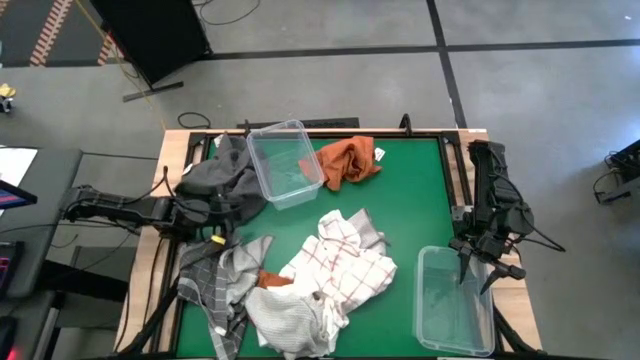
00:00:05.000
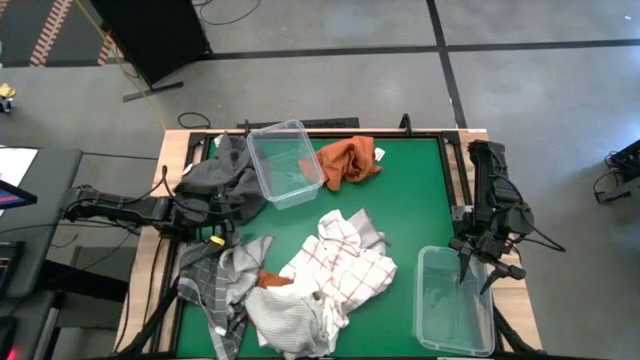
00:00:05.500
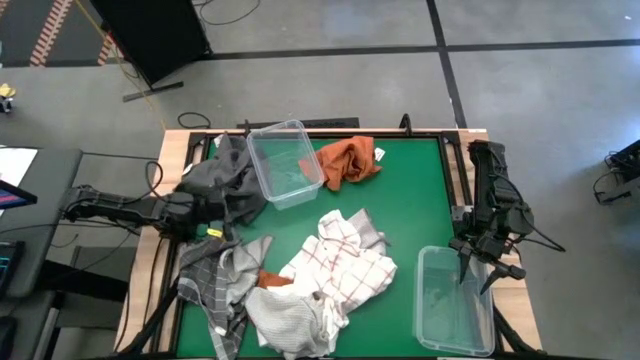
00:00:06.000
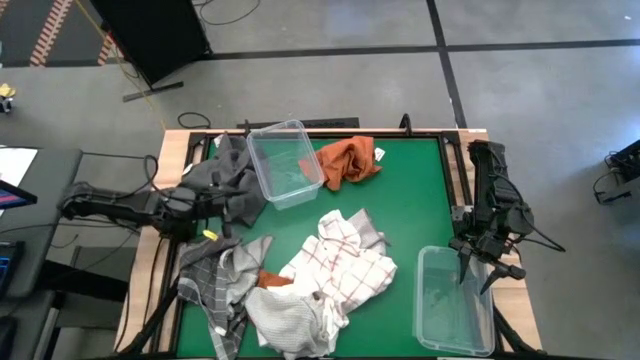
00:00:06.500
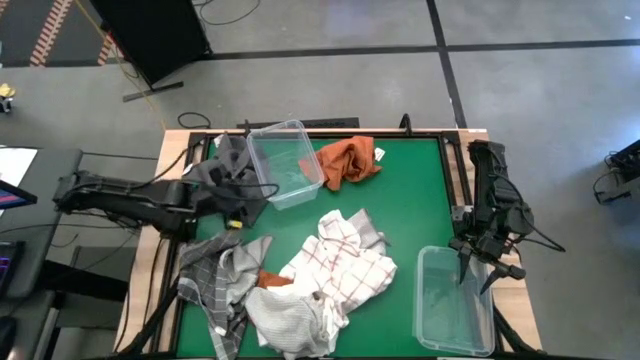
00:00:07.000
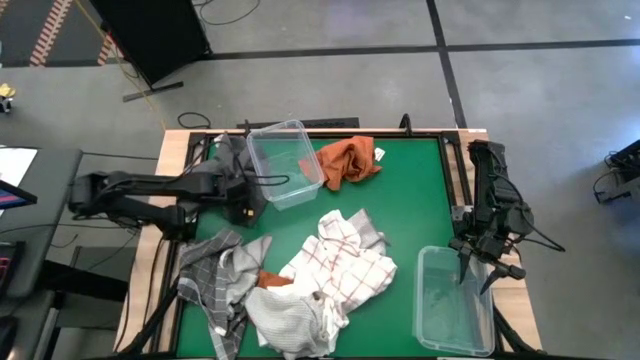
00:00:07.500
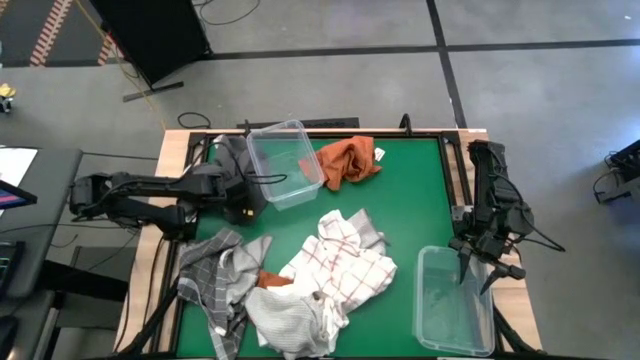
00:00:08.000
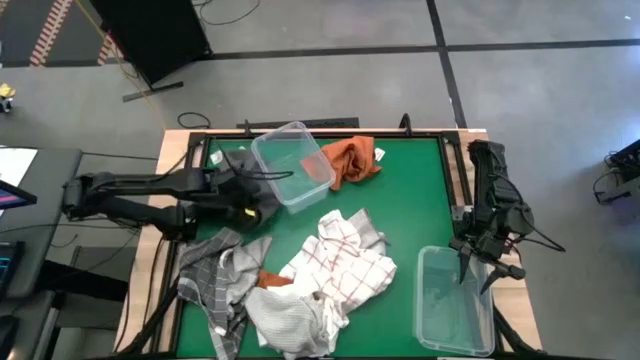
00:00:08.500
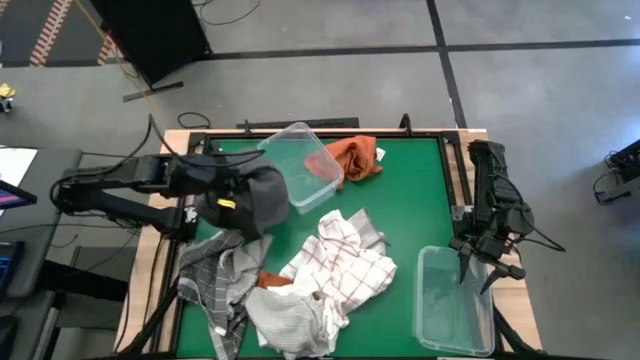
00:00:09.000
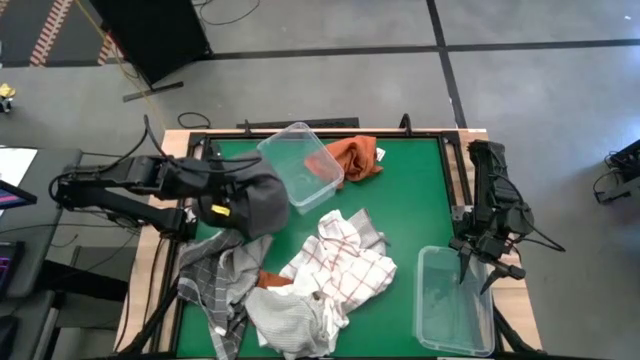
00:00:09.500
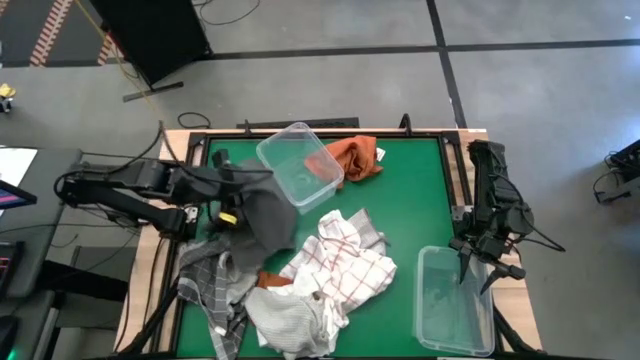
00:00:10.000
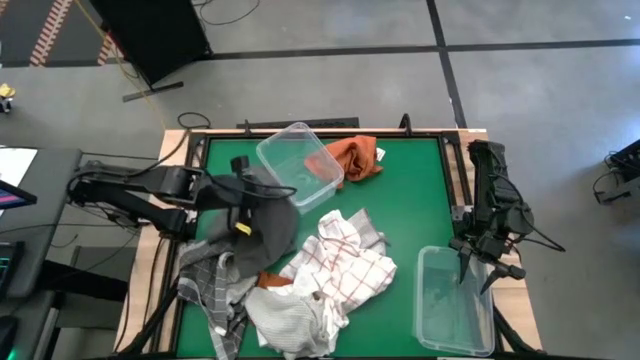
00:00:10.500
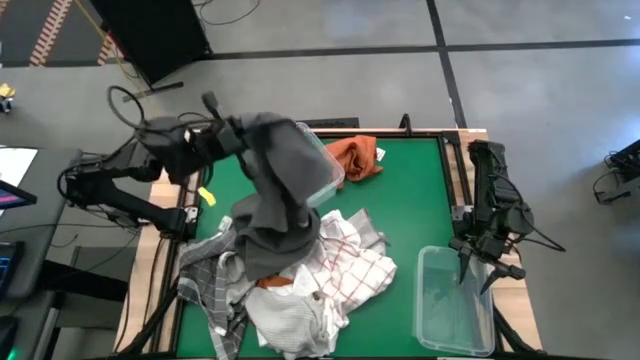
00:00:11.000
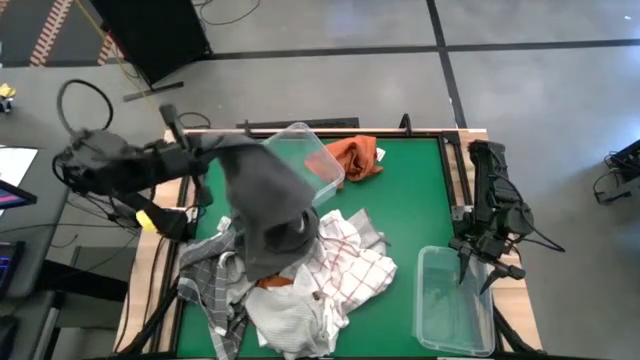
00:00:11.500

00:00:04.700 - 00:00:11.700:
Task: Sort towels by color in basket
Put the gray towel into the top transparent bin

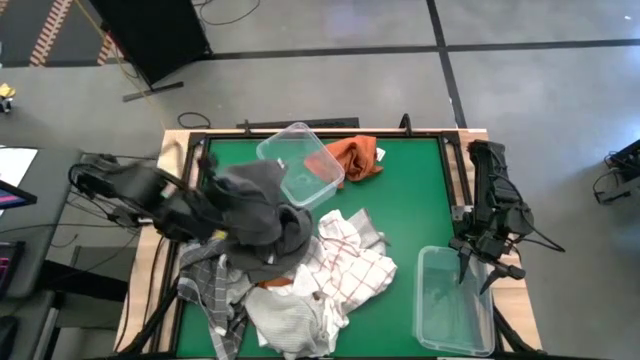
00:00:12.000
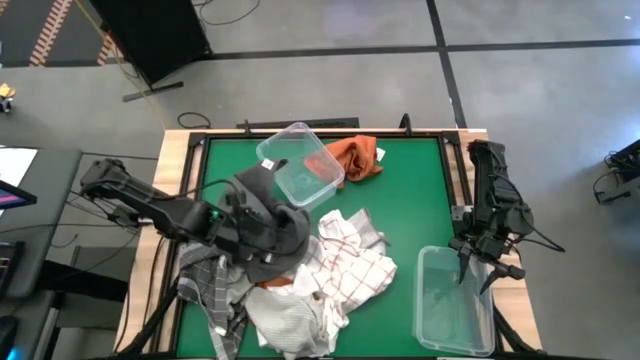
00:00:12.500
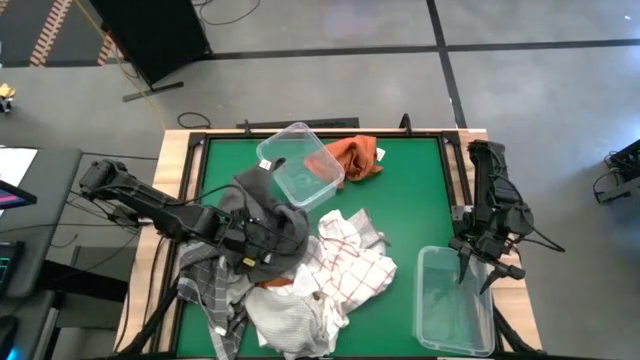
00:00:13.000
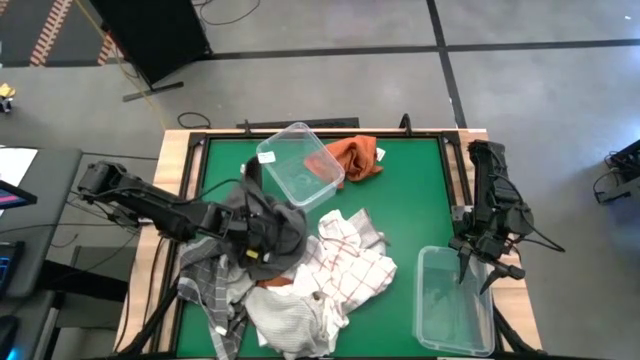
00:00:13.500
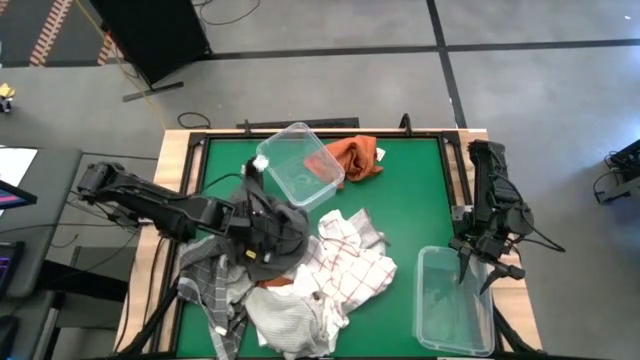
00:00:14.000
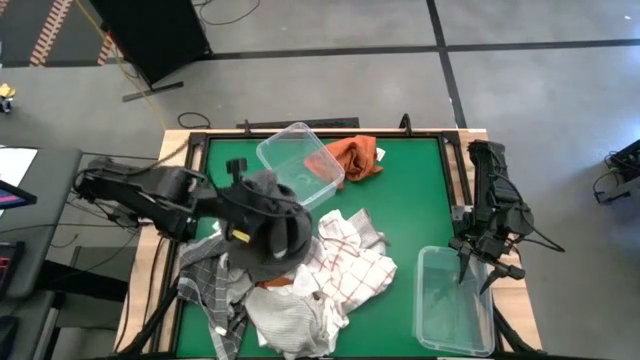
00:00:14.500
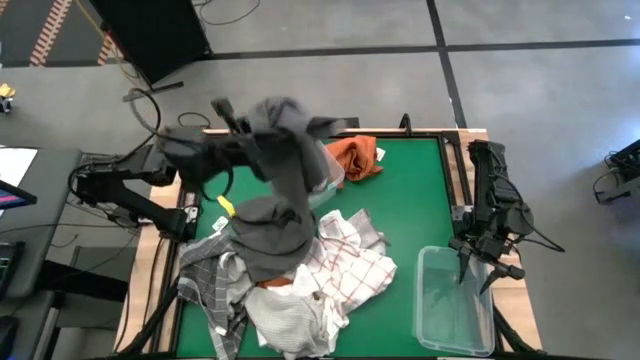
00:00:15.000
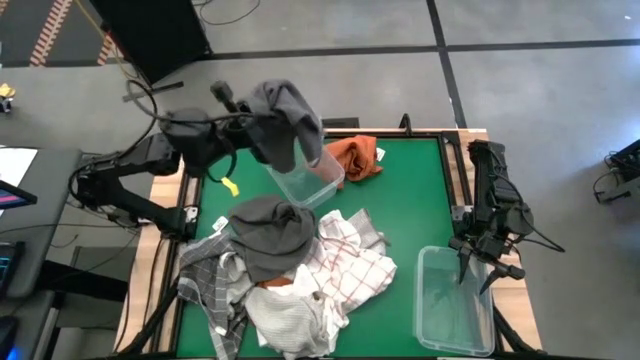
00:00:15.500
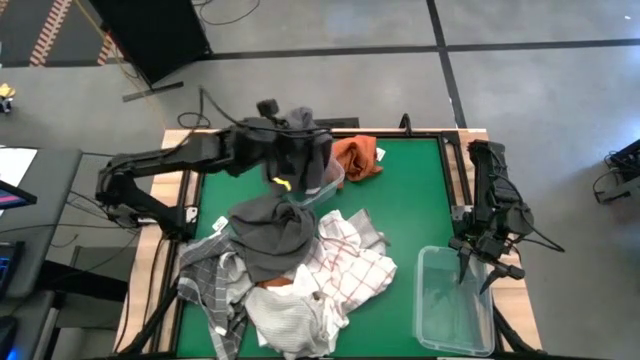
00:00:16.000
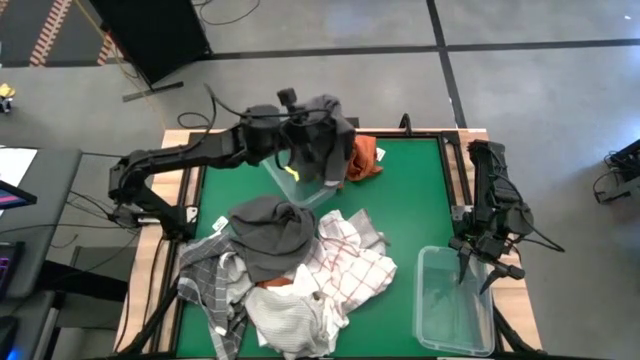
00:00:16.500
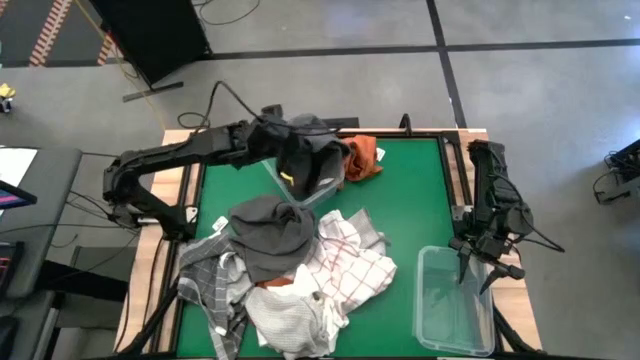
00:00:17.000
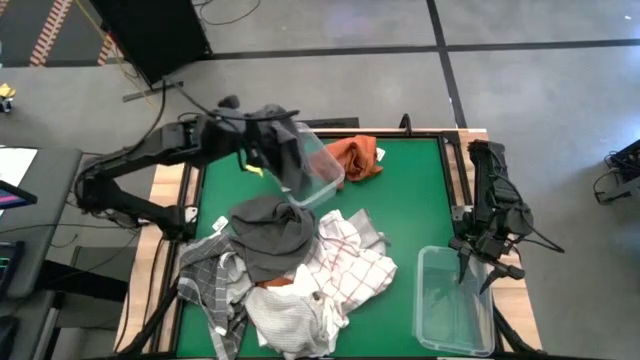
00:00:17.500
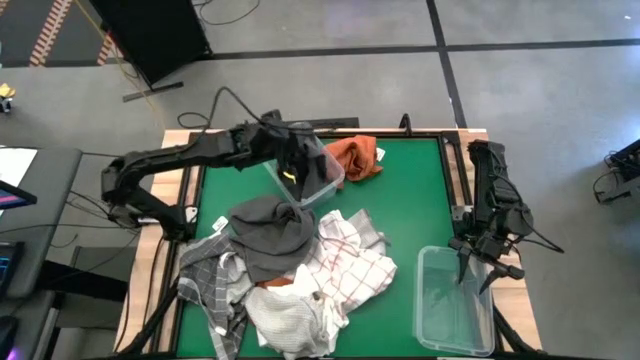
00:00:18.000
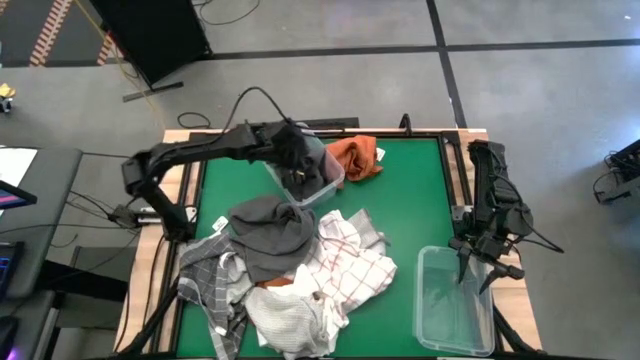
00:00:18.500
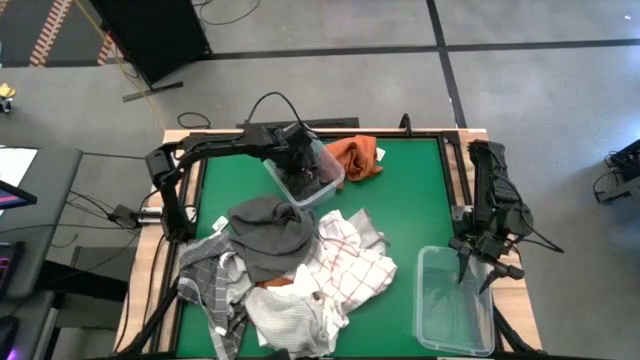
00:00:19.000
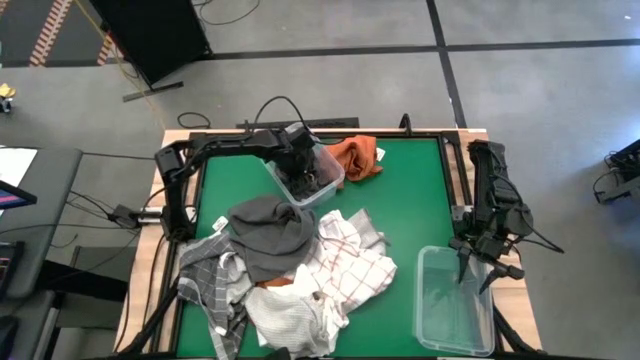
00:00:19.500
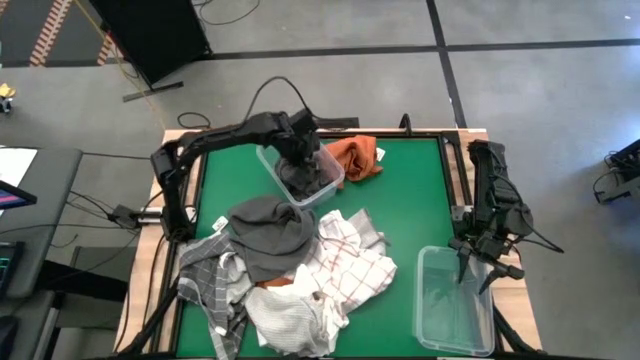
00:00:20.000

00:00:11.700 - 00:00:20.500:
Put the gray towel into the top transparent bin

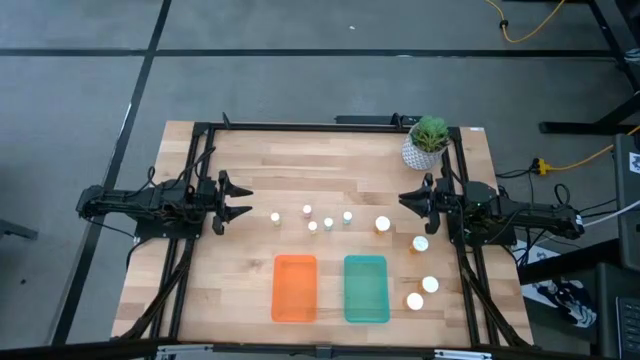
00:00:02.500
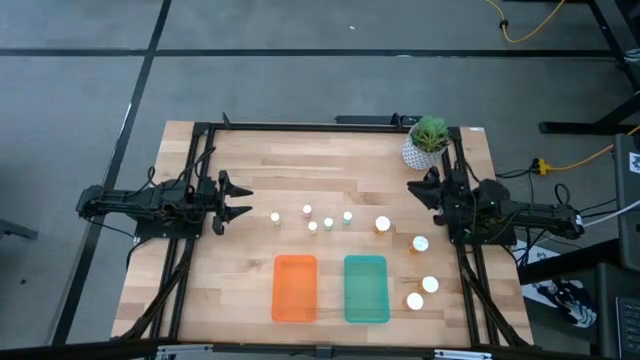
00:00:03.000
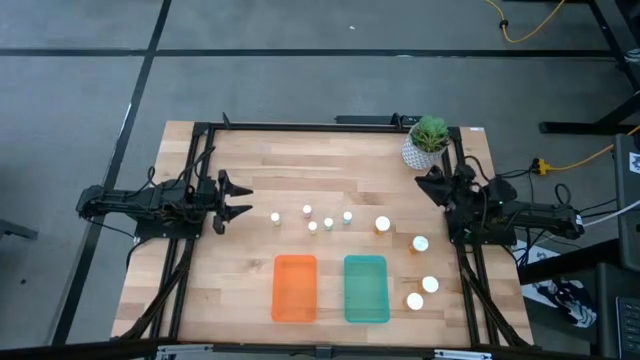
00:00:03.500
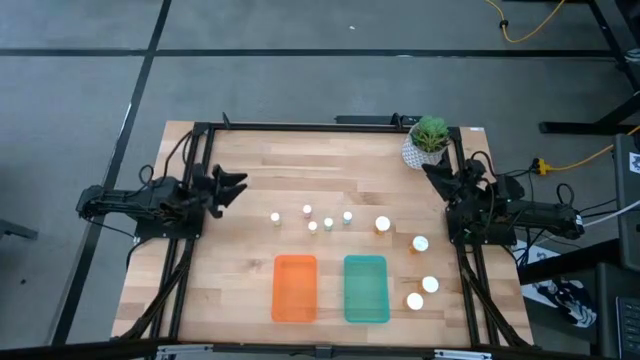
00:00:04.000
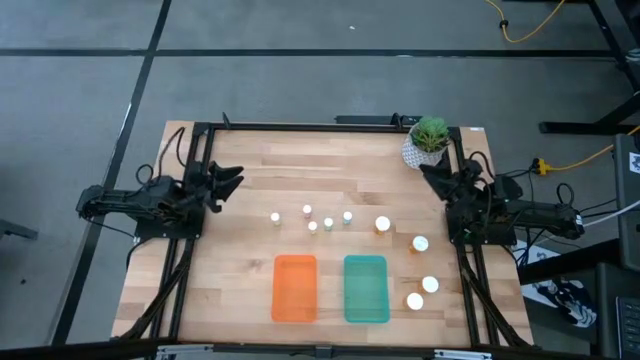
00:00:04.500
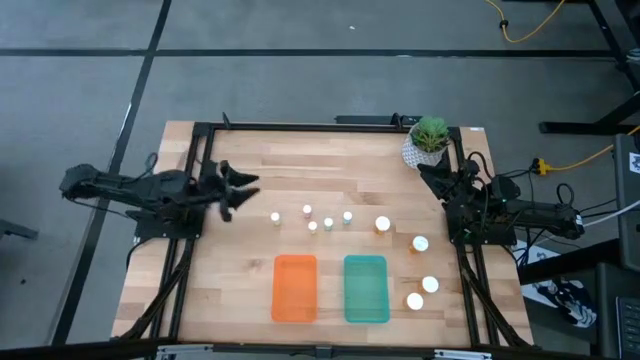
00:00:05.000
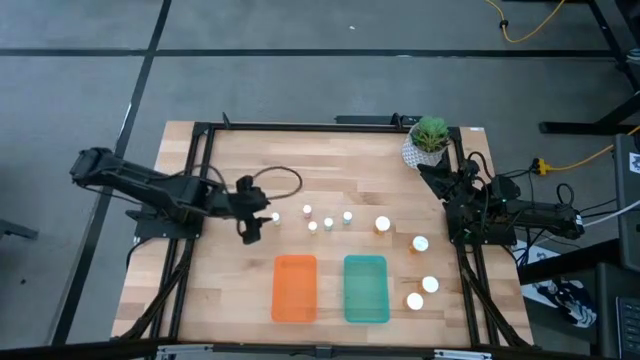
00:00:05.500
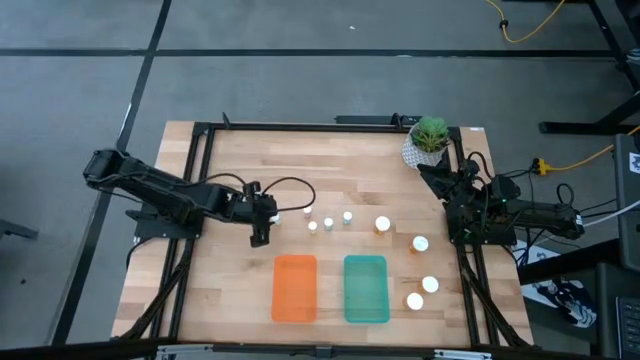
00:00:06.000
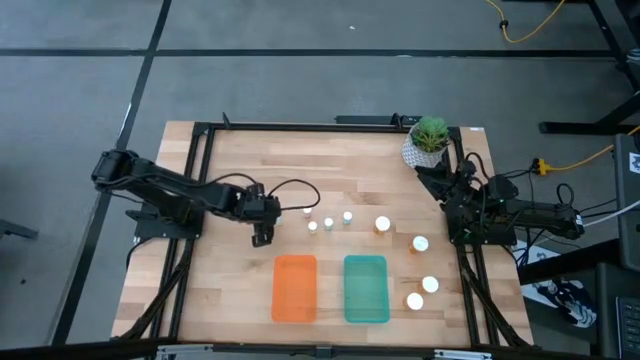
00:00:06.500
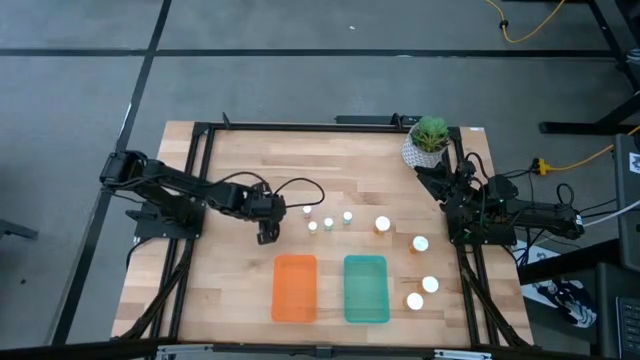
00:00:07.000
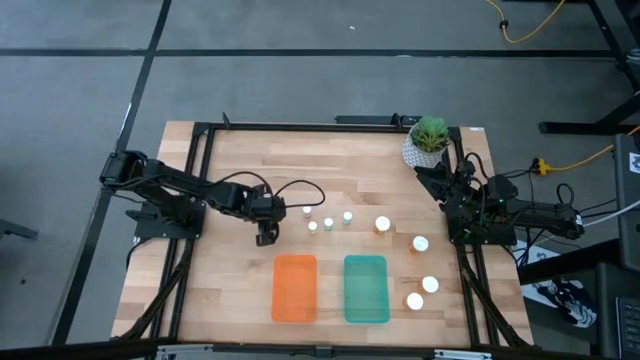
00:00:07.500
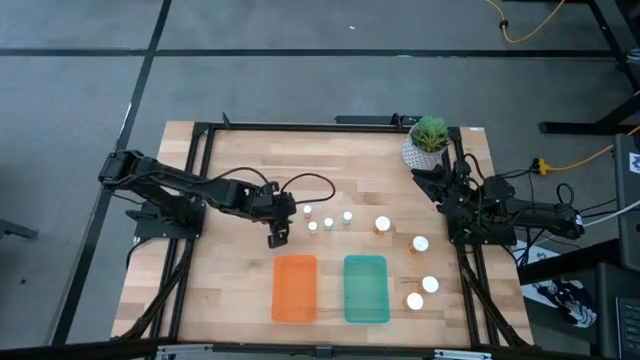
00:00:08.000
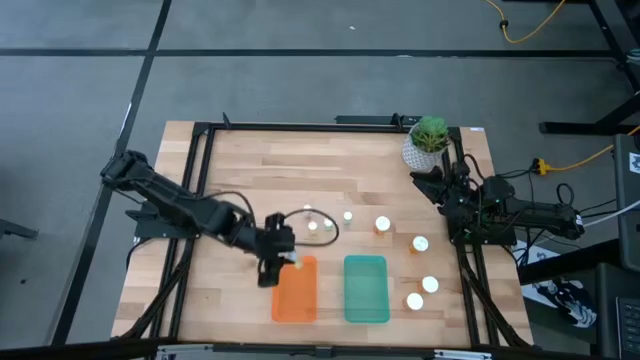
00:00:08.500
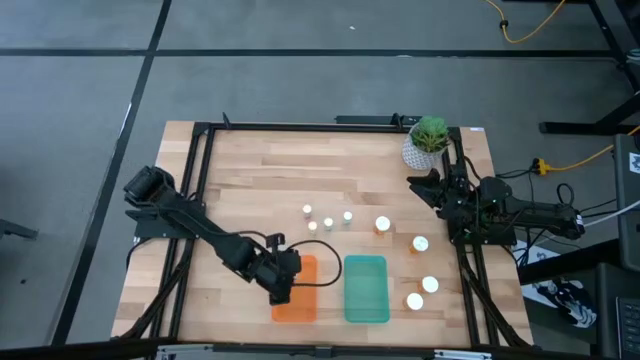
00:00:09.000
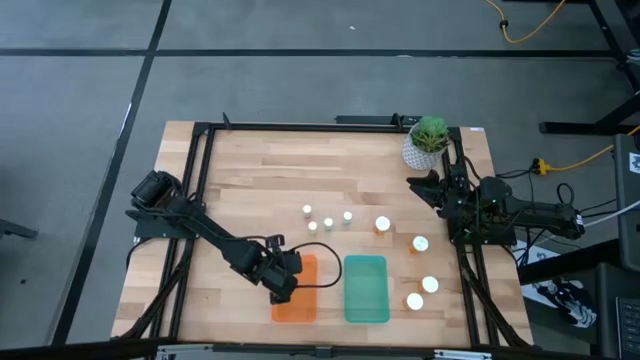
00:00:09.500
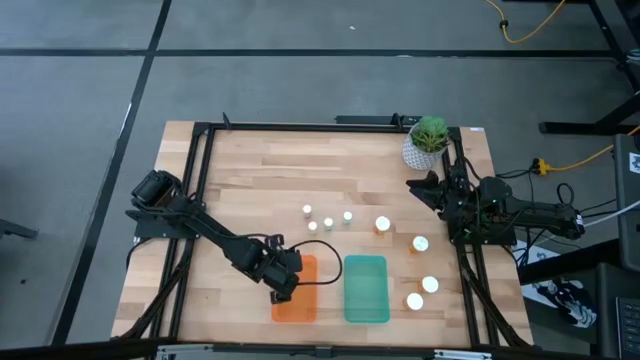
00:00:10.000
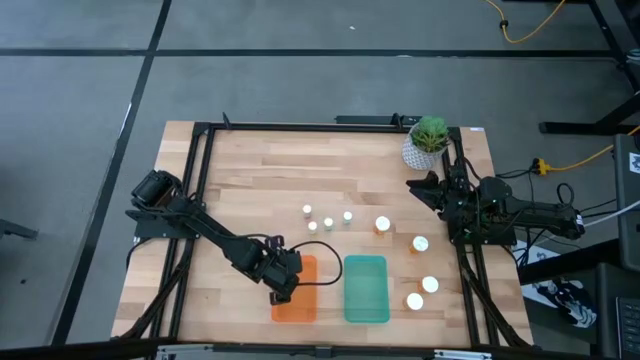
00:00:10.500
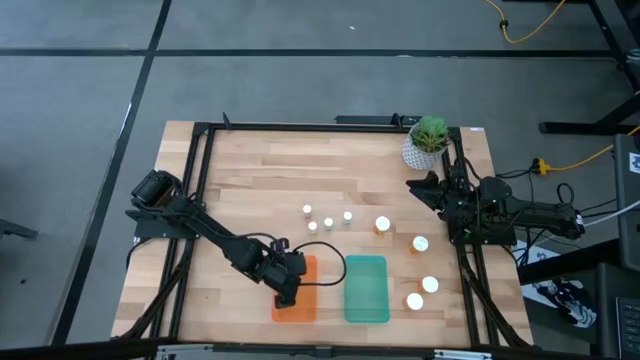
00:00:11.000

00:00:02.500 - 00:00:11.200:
Task: Pick and place medicine bottles into bin by pill shape (circle, oval)
Put the left small yellow pill bottle into the orange bin
